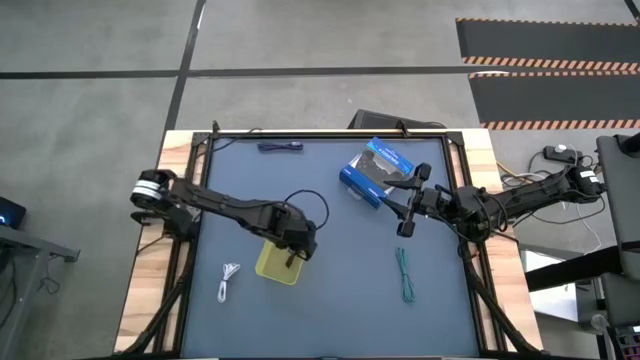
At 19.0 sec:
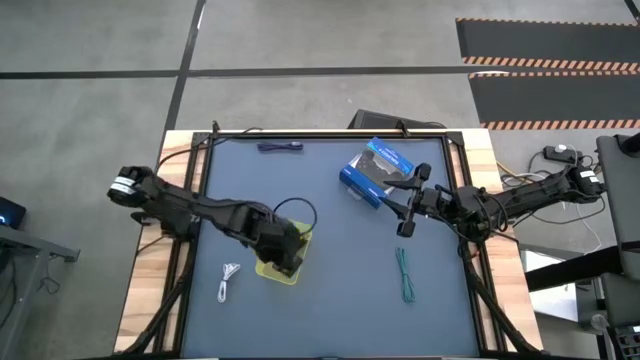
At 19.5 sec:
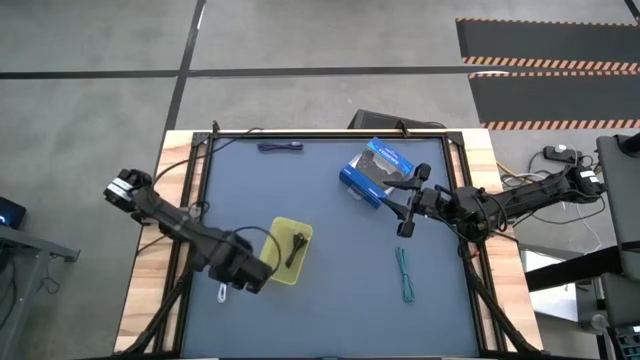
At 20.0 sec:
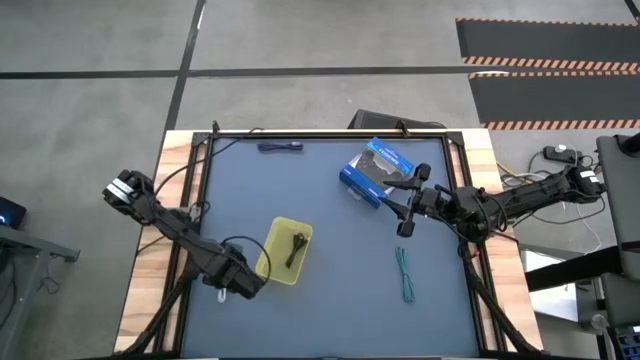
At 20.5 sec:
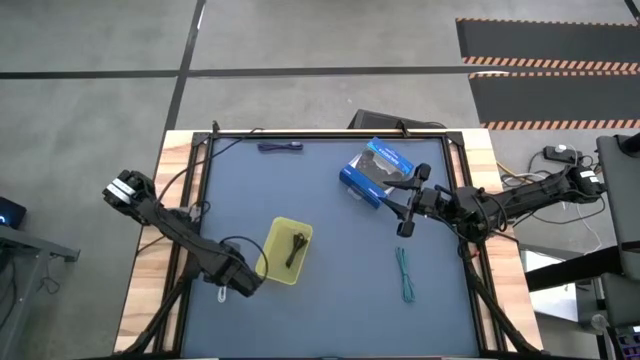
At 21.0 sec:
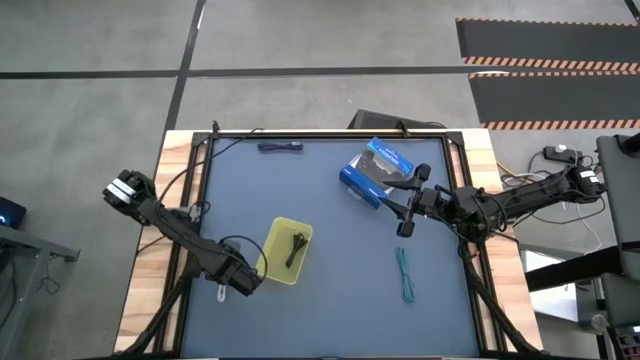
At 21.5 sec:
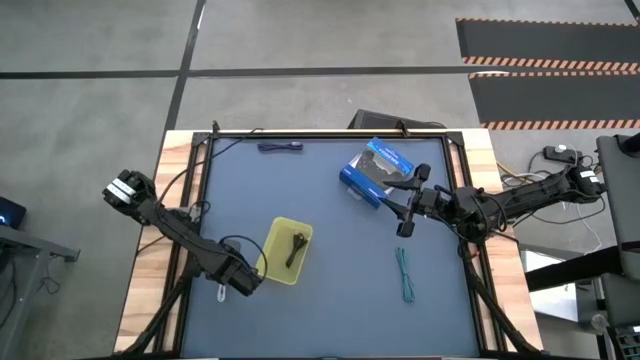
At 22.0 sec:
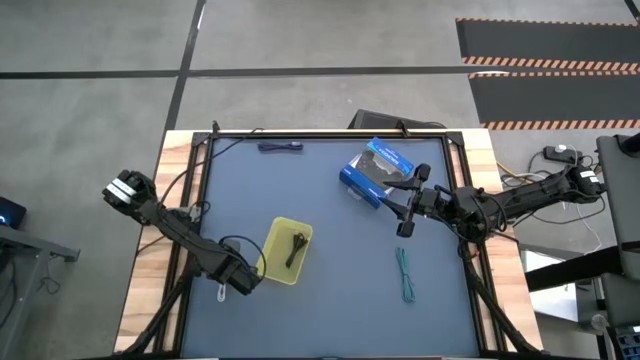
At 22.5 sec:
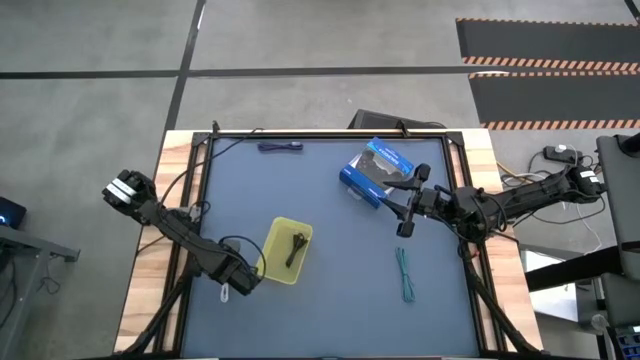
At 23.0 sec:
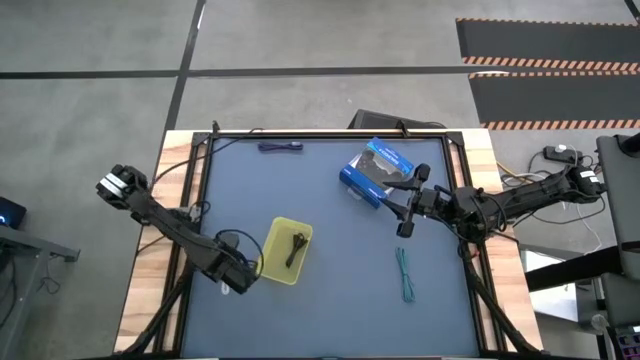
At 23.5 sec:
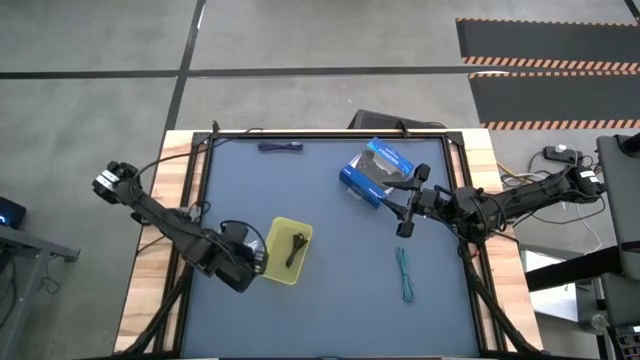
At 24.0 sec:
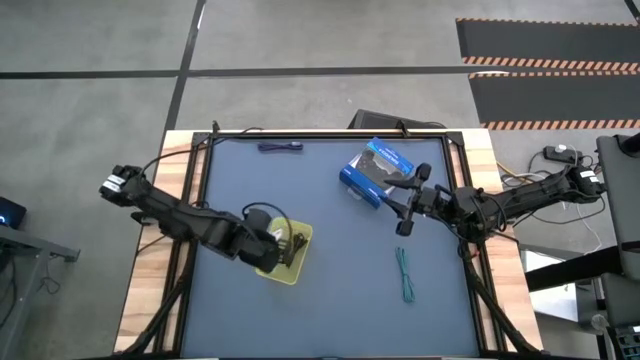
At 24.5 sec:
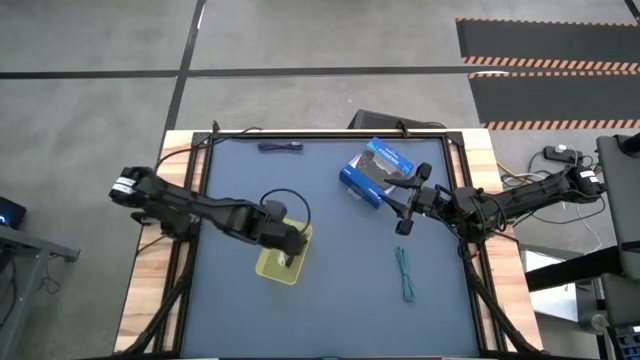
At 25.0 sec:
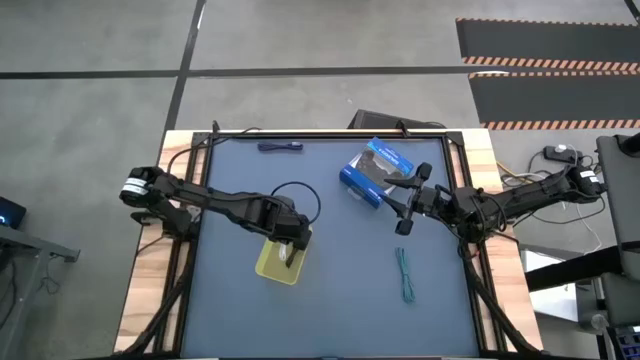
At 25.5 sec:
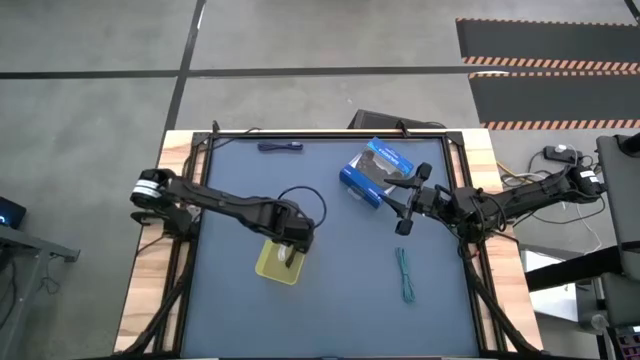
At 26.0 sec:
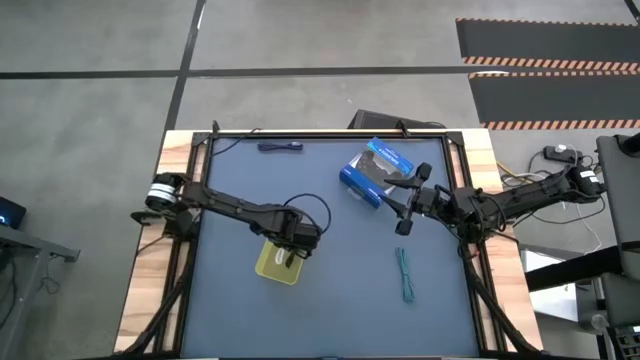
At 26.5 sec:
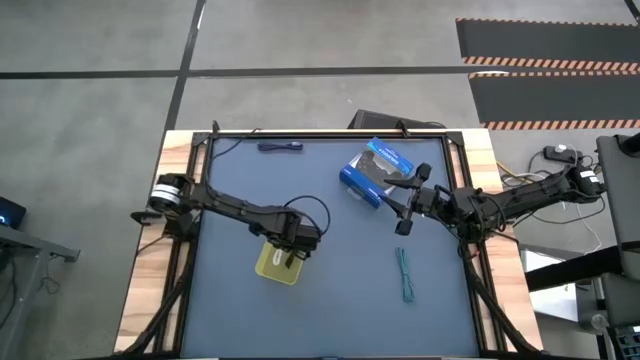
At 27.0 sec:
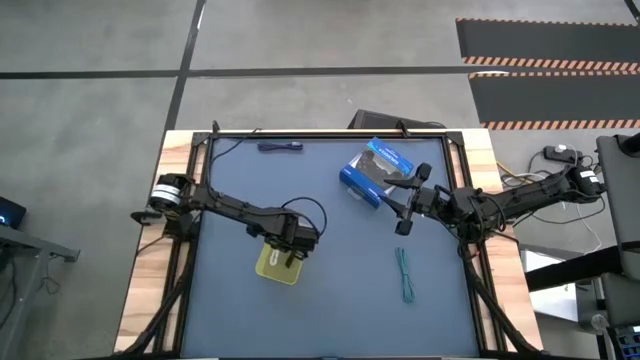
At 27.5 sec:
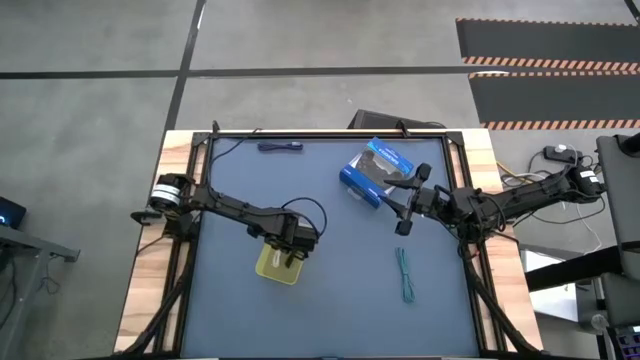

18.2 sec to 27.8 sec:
Task: Pick and place USB-C Cables
Put the white charger cable into the yellow bin

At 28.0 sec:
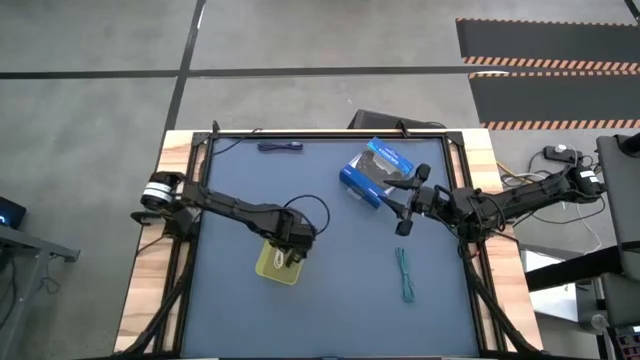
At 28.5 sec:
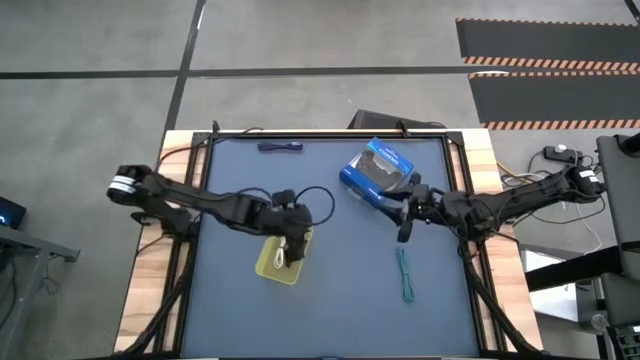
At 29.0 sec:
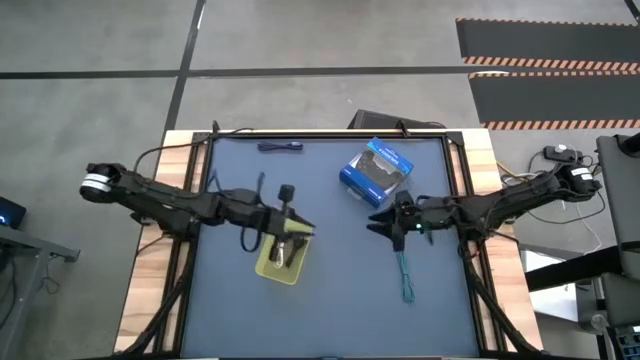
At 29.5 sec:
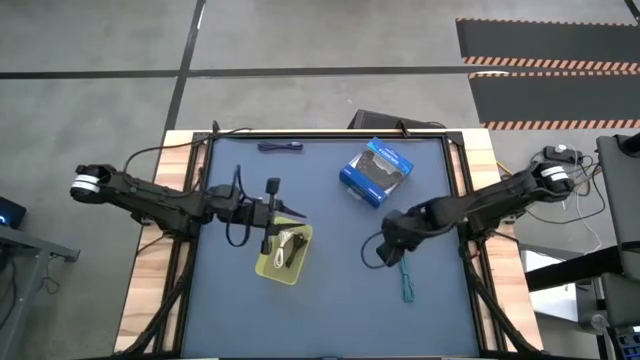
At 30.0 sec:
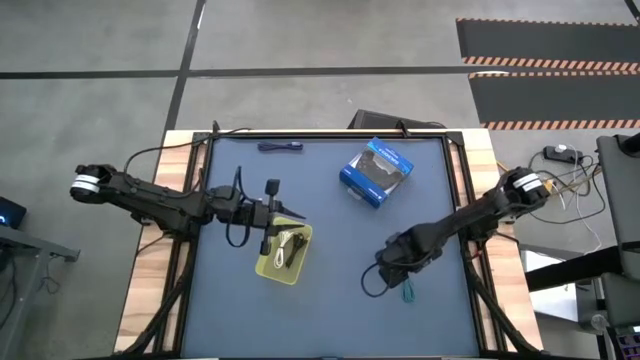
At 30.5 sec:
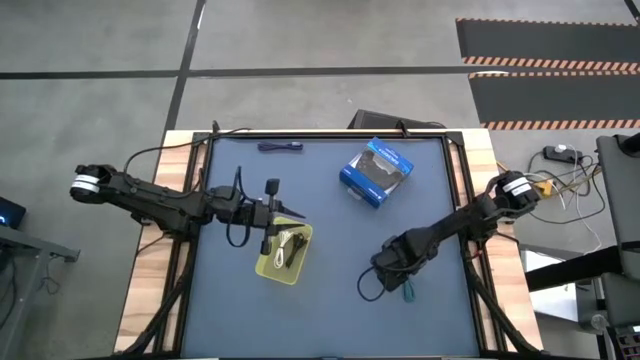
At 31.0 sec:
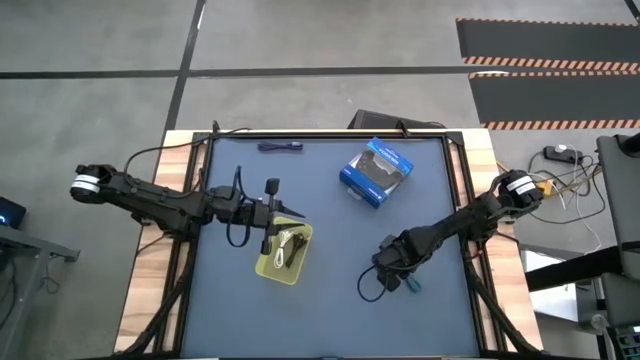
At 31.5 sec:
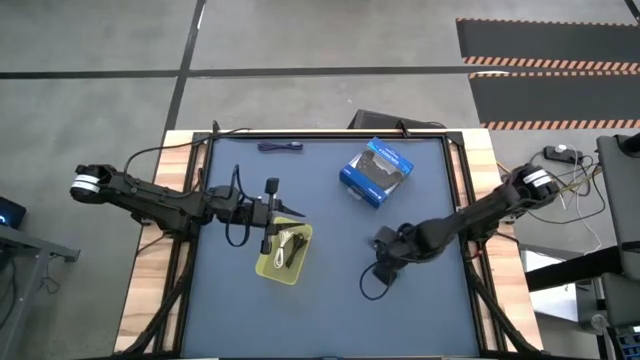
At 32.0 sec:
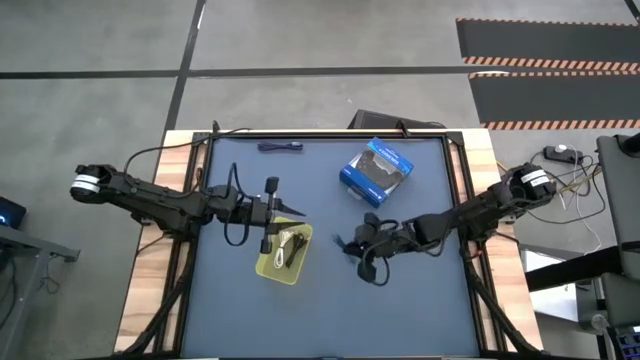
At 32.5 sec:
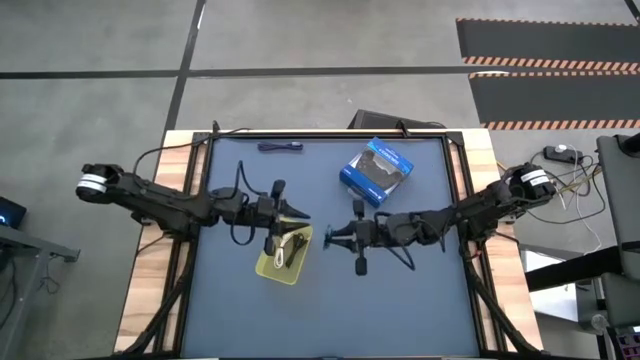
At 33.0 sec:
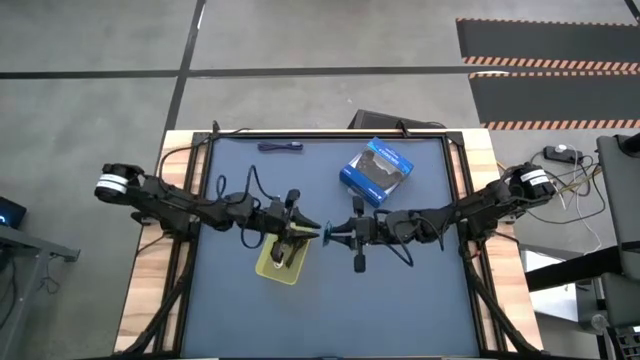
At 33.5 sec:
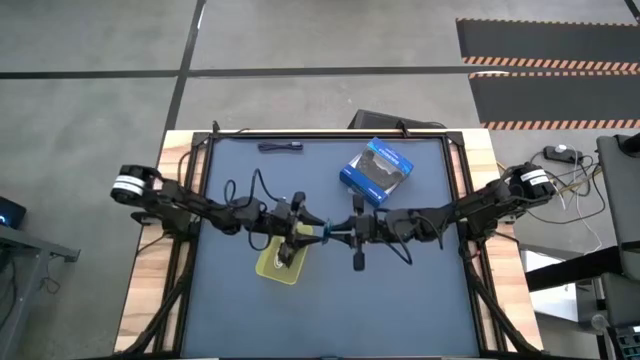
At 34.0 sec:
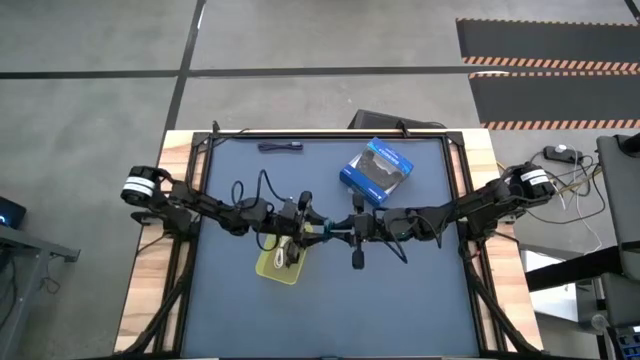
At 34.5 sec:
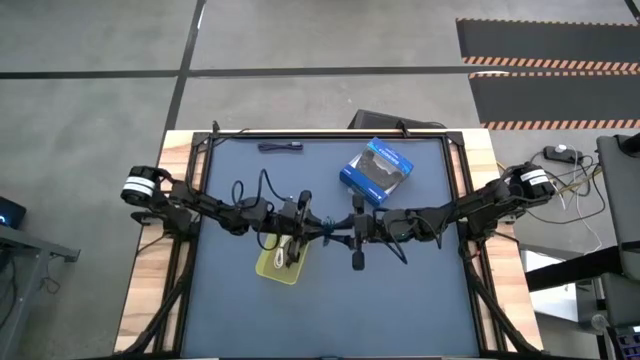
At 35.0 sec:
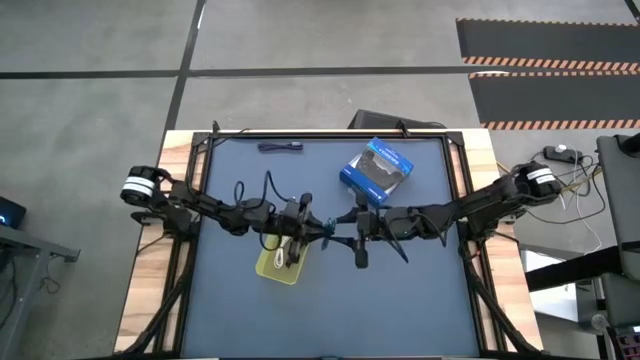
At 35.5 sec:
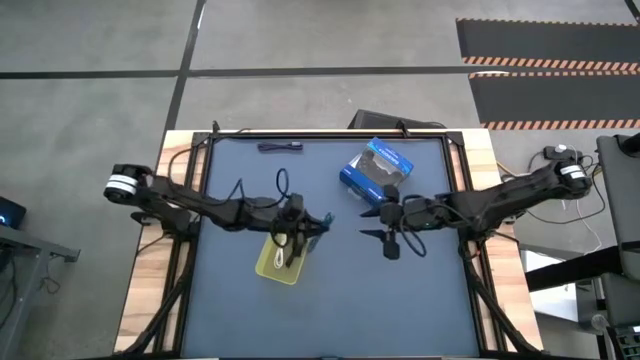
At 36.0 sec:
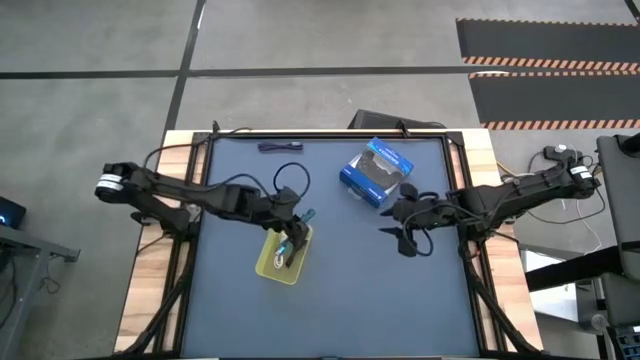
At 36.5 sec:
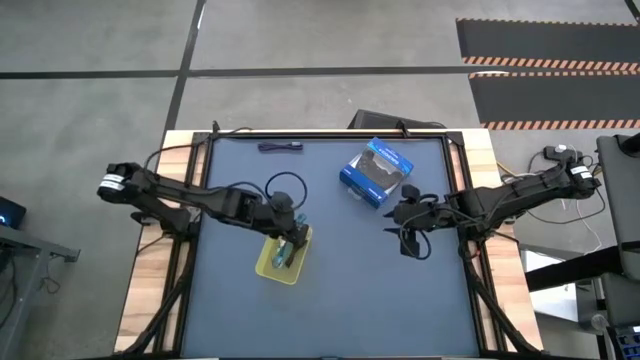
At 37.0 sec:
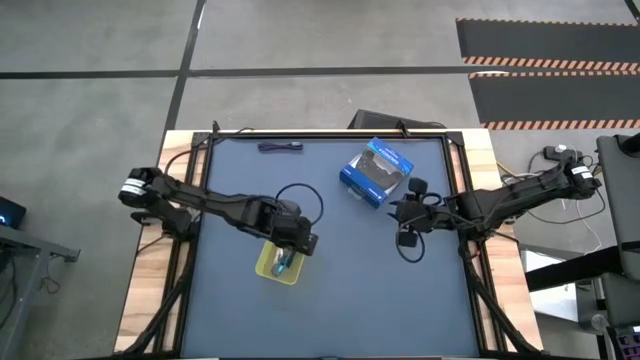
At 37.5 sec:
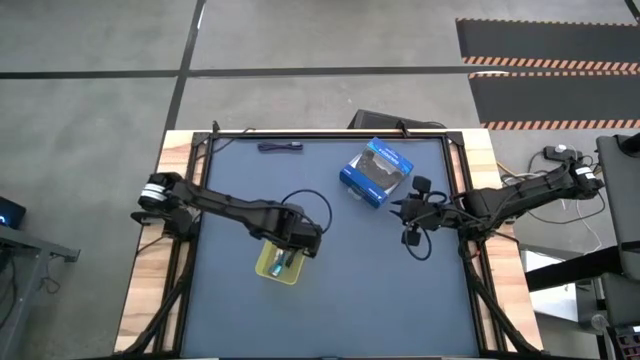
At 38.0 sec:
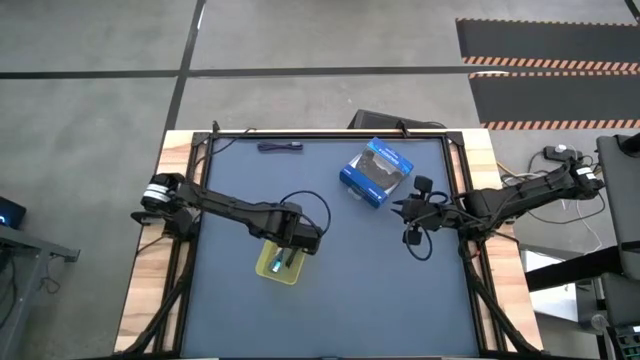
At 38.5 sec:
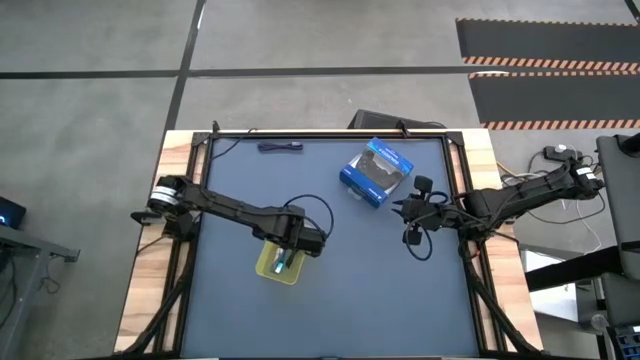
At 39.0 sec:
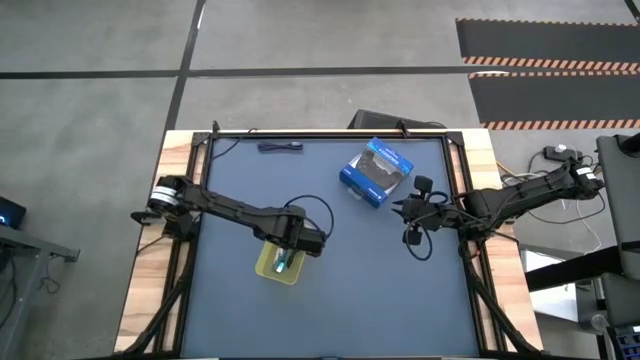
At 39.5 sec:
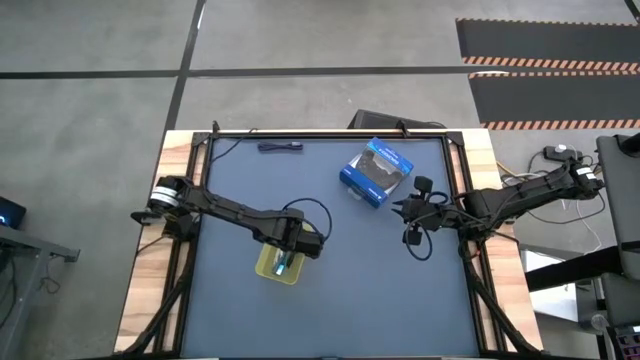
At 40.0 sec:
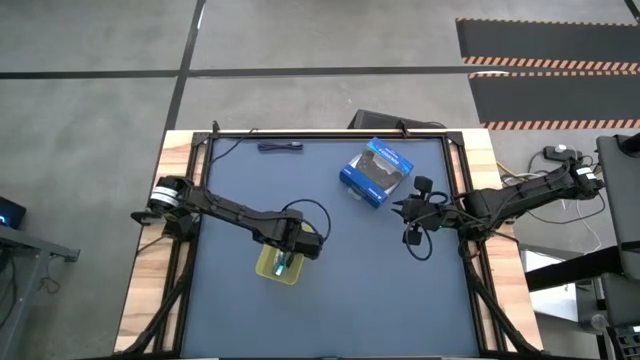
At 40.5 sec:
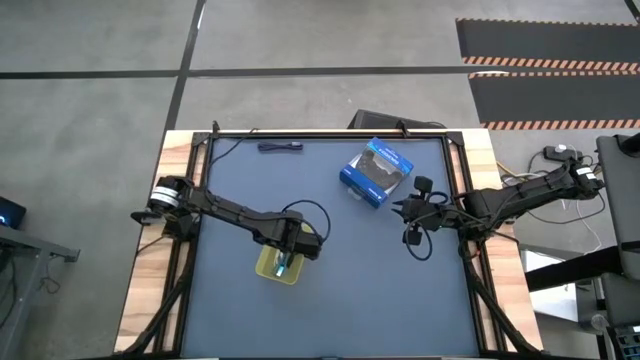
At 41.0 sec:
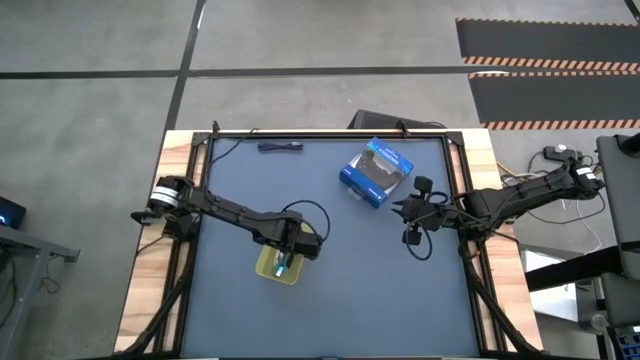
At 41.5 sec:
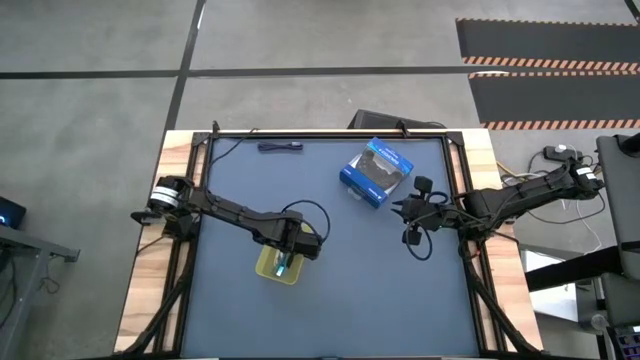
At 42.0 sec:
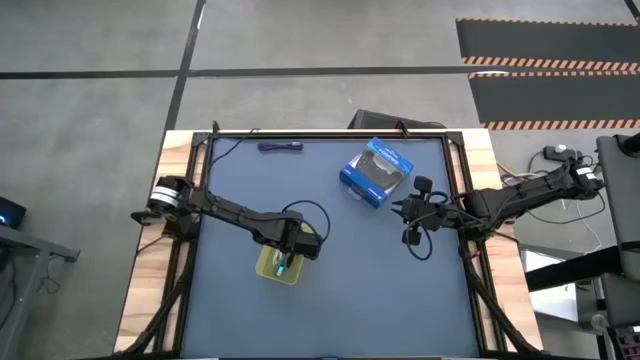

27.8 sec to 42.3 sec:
Put the blue charger cable into the yellow bin
